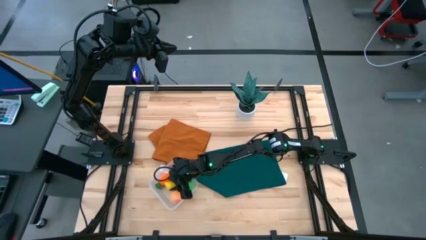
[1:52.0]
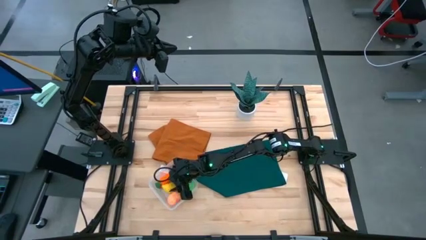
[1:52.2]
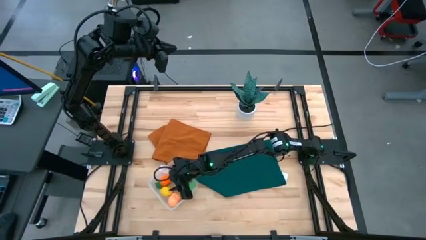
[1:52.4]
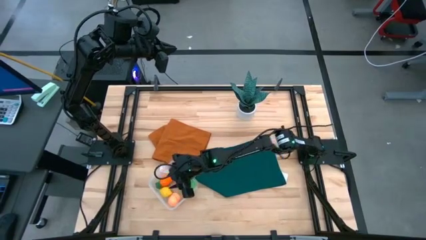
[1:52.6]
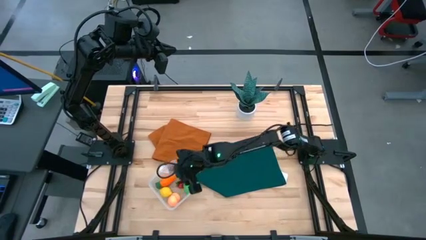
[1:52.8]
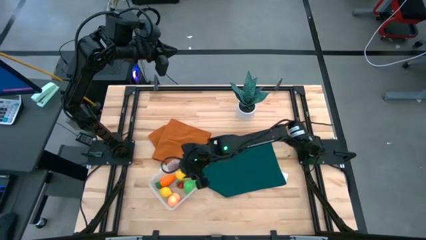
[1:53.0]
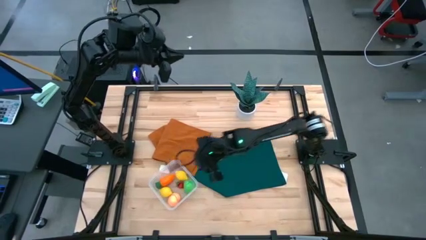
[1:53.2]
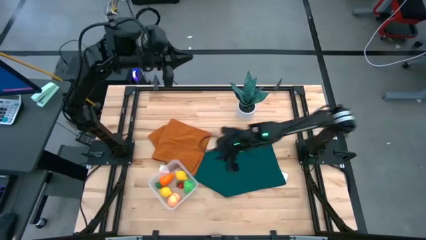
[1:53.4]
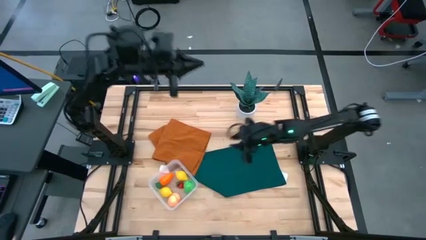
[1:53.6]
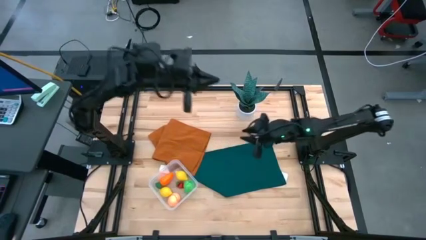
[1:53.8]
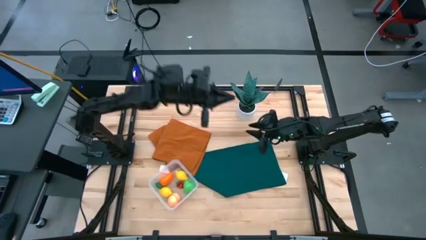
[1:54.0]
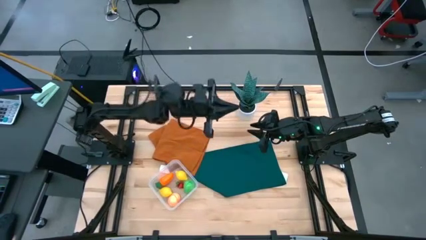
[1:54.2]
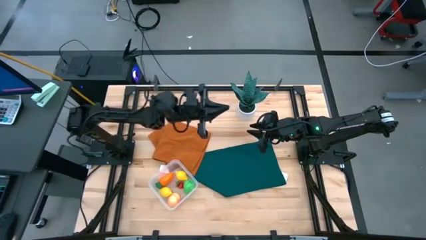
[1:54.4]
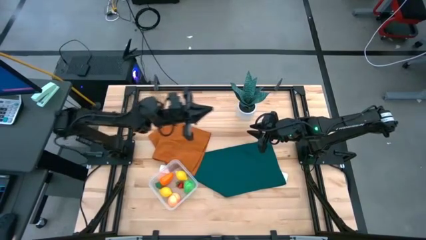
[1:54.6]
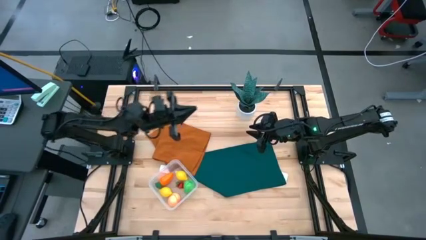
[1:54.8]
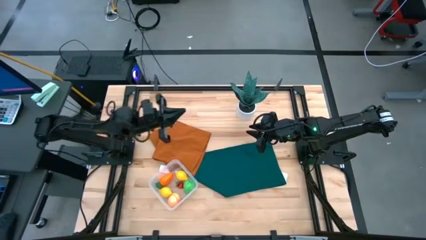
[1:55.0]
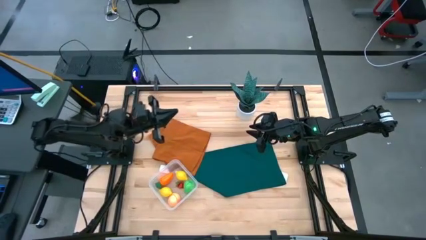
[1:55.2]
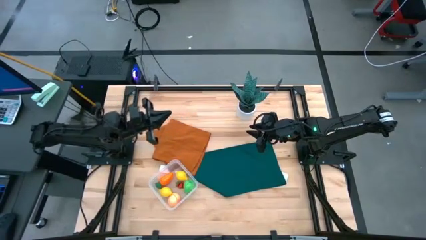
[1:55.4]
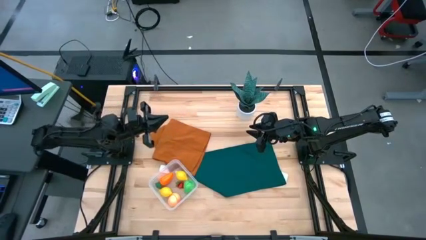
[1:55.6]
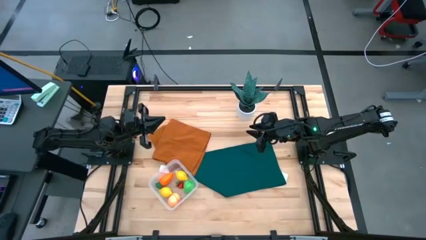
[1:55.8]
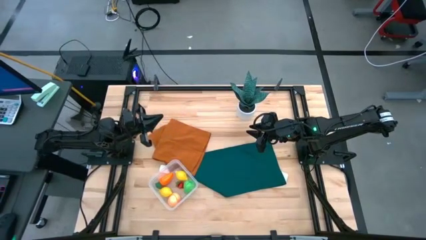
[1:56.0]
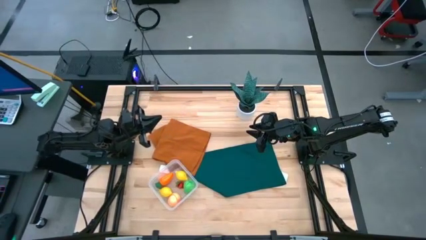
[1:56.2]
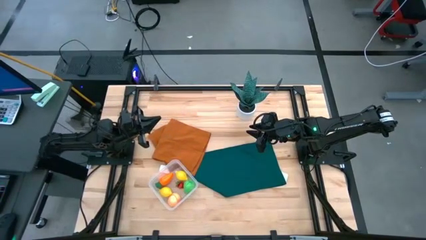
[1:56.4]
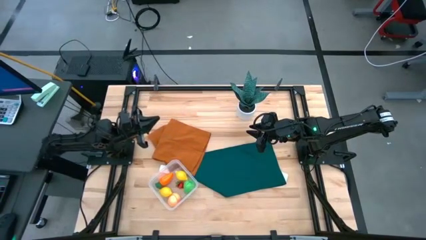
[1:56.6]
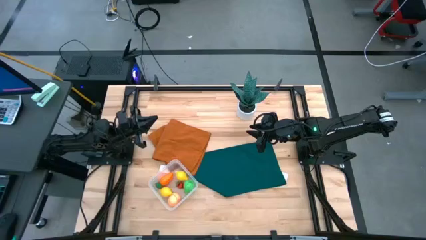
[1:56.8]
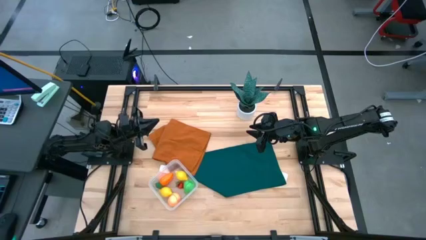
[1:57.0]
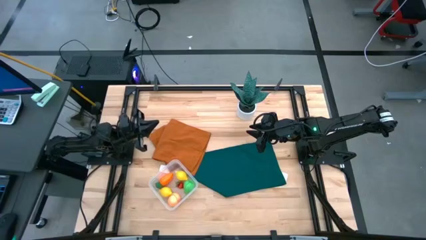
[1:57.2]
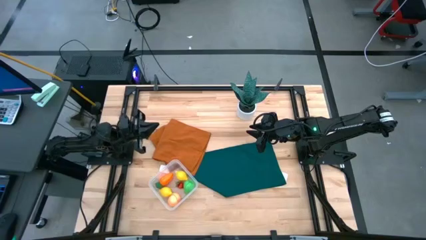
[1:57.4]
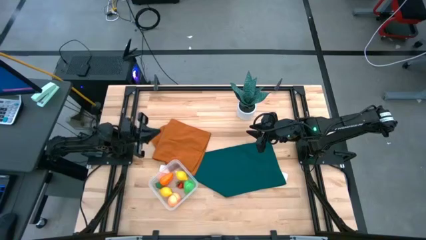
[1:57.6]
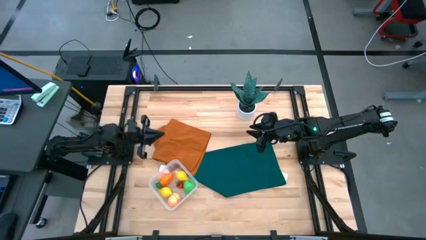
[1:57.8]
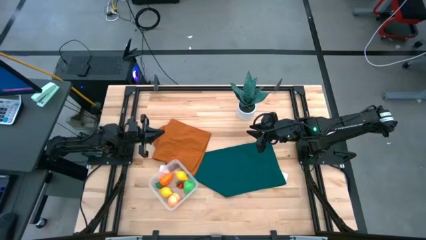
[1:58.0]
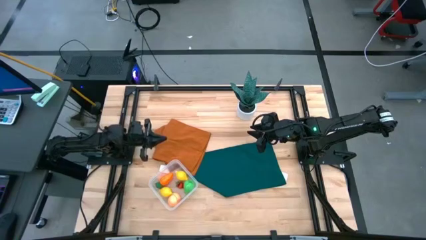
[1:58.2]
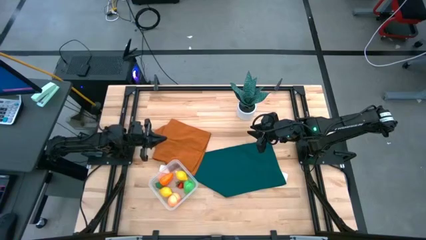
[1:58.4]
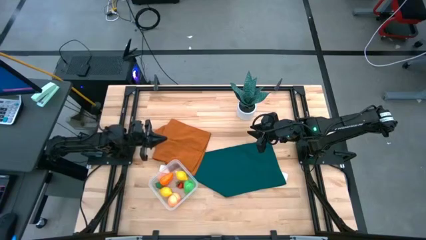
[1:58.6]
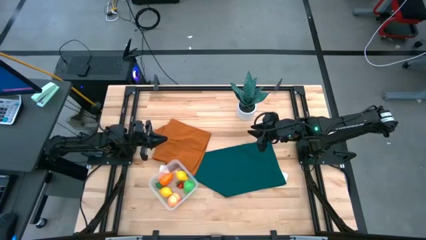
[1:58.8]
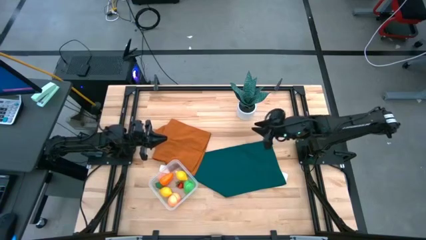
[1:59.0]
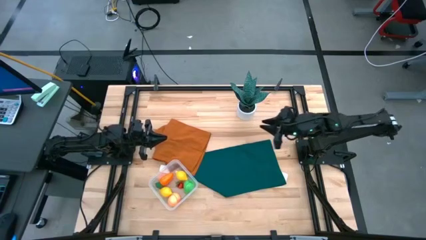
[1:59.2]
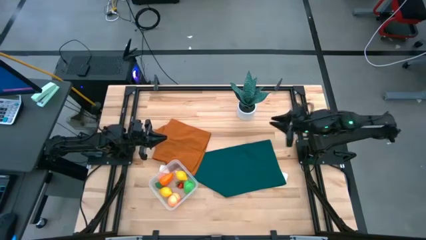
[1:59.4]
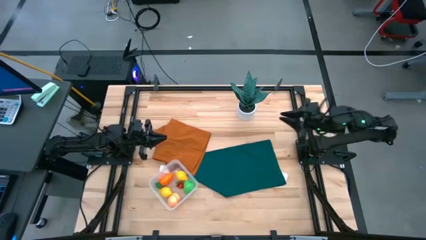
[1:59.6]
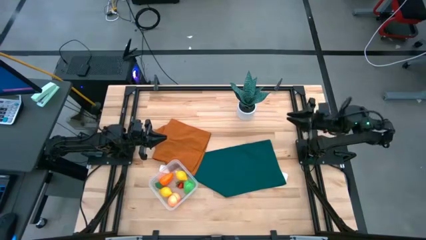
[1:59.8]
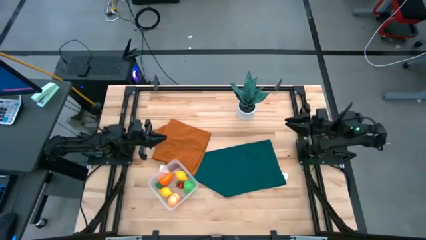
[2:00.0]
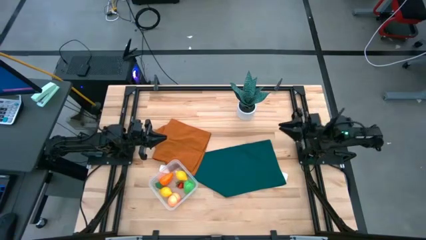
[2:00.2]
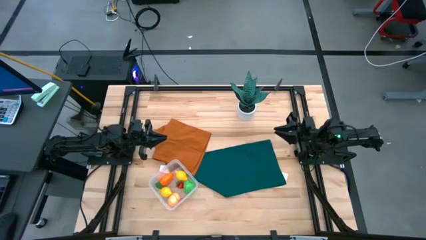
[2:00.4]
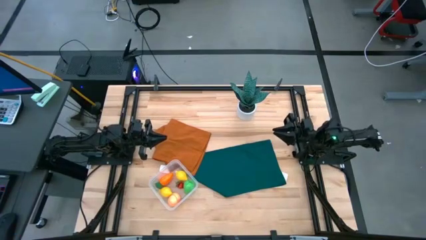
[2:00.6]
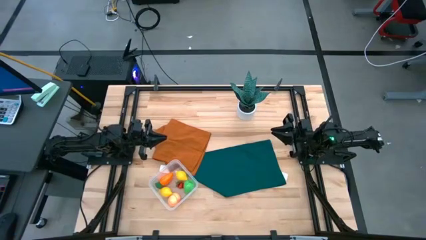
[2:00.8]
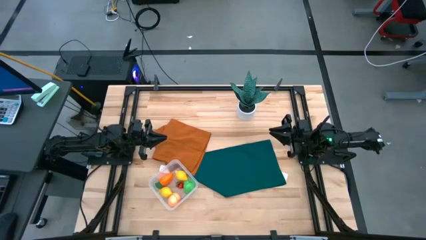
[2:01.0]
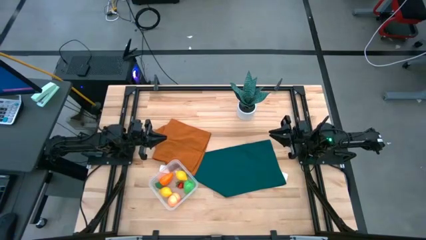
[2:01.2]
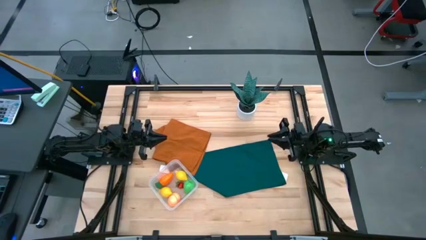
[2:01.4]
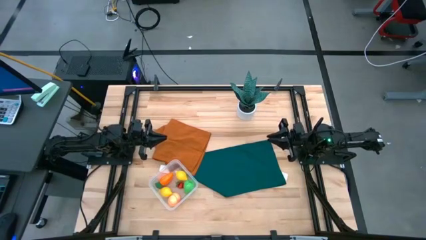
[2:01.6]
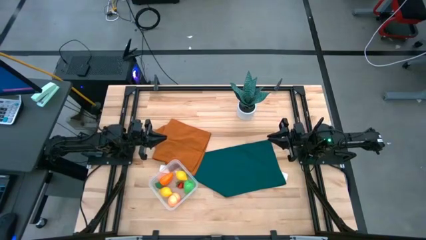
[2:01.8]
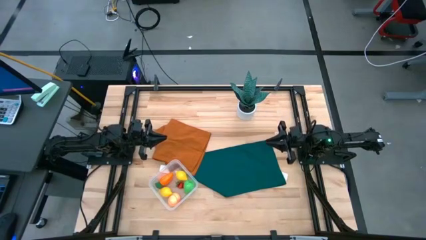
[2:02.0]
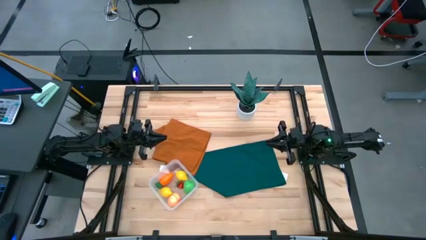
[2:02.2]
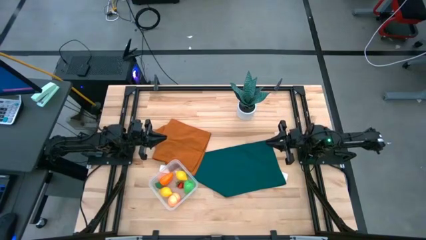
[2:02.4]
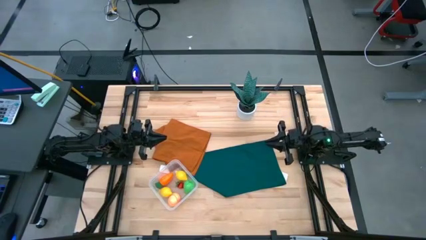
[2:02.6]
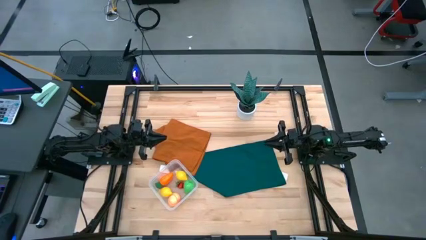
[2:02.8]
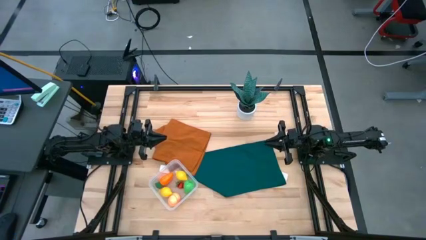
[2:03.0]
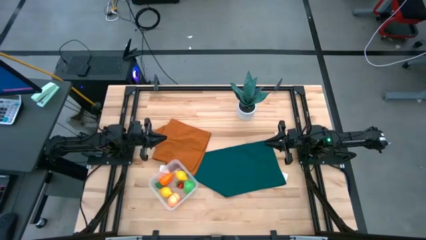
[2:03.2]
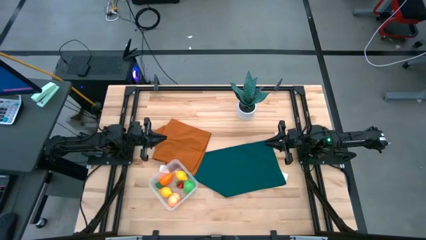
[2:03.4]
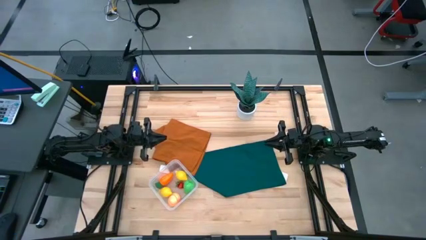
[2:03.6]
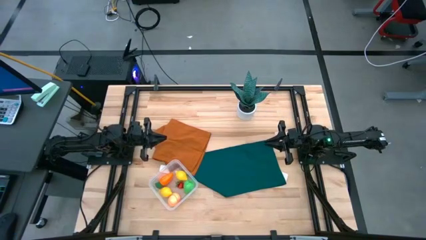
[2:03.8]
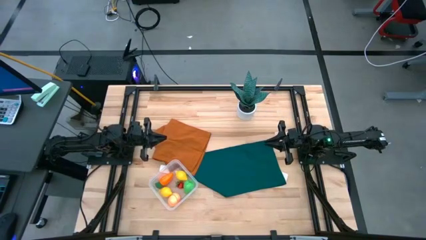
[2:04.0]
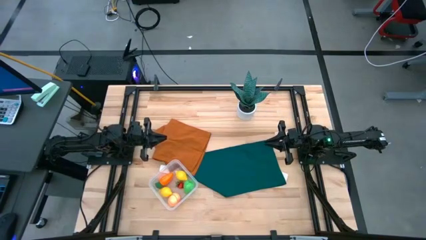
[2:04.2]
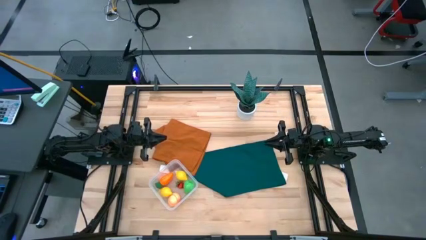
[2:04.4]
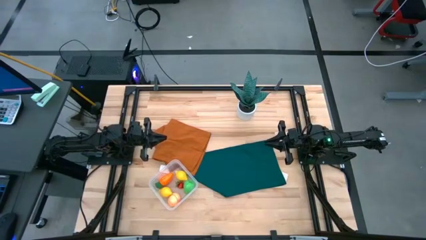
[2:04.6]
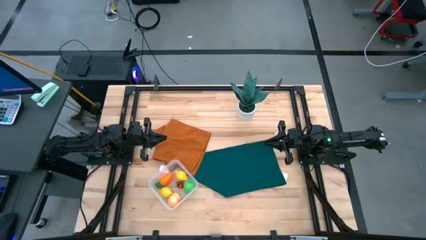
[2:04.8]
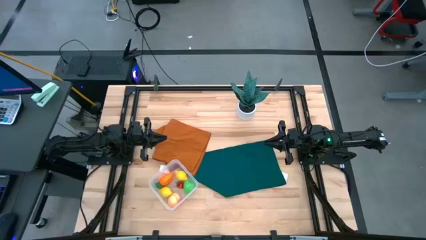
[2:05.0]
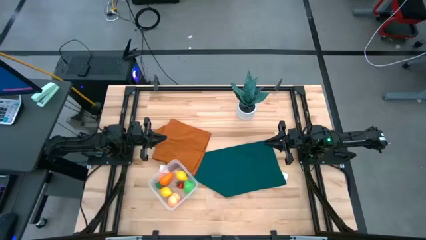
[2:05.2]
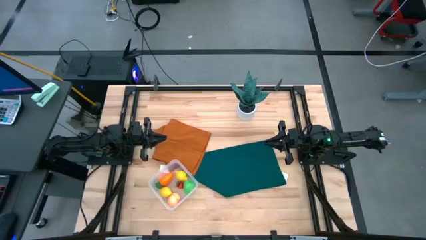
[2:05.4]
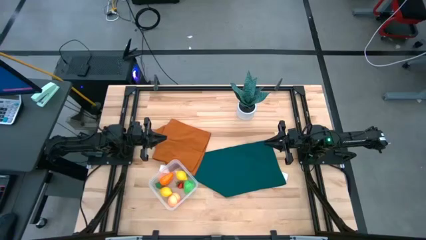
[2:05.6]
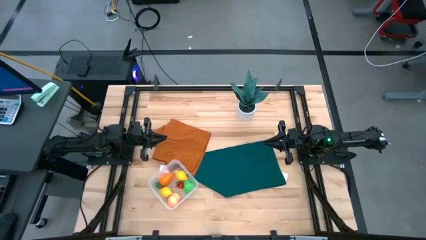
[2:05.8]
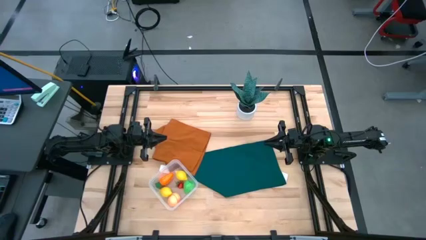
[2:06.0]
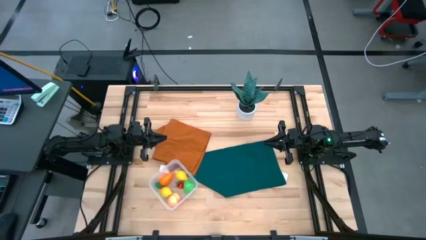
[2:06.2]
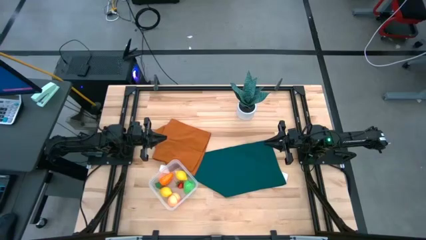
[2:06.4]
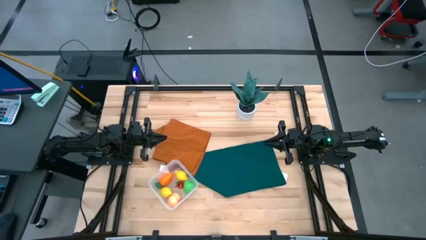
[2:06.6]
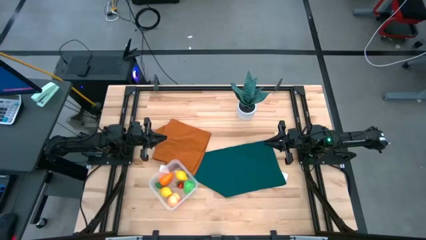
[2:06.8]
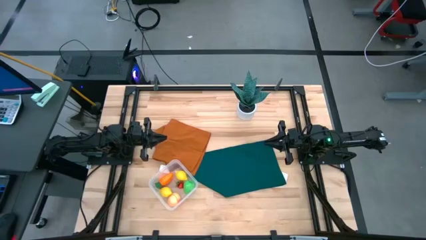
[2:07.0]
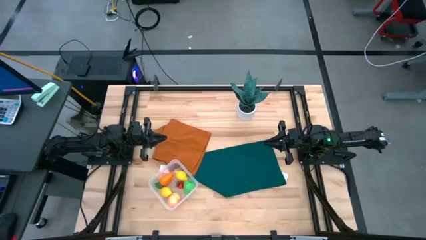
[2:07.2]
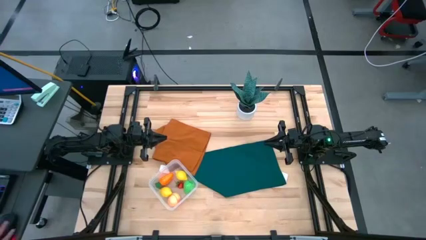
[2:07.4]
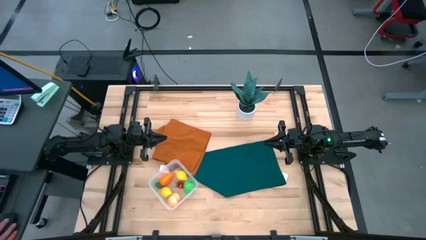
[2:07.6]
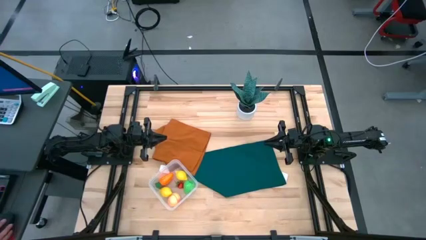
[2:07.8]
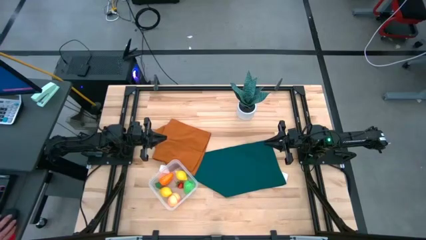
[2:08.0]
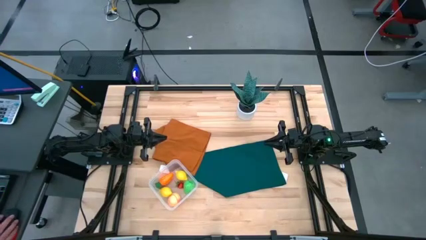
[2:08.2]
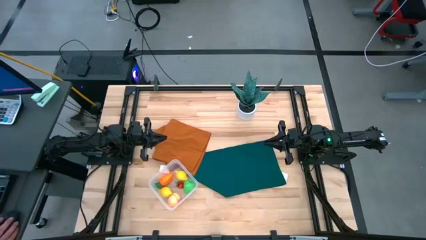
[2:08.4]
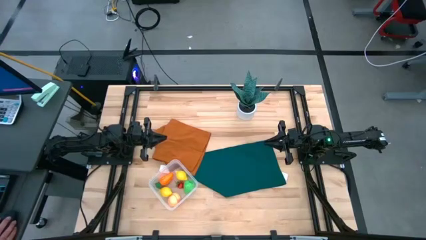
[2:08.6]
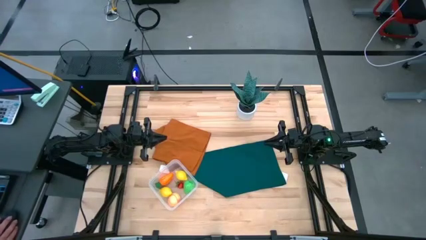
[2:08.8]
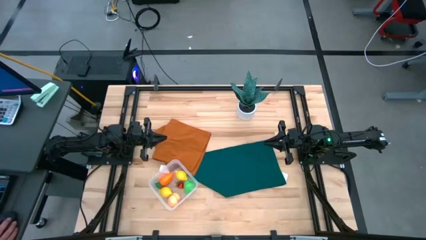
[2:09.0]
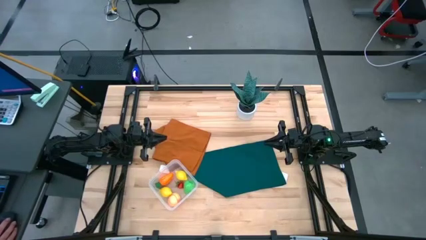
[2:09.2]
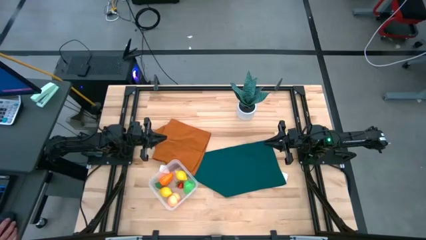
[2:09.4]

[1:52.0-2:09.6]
Task: Pick and placing Produce into tupperware
Return to Home Position
